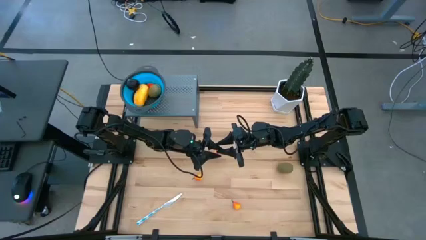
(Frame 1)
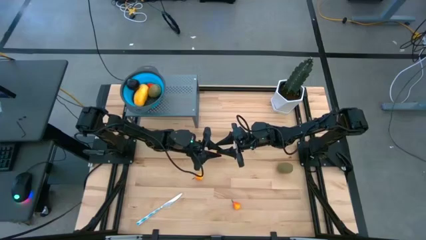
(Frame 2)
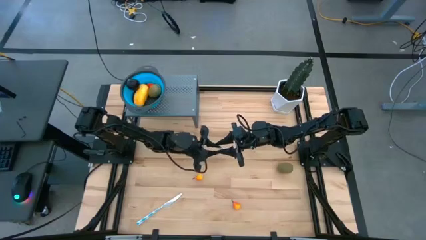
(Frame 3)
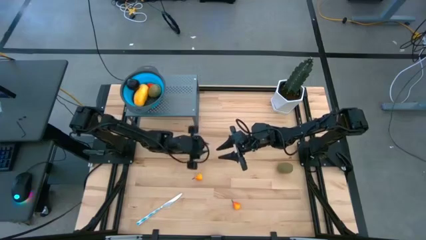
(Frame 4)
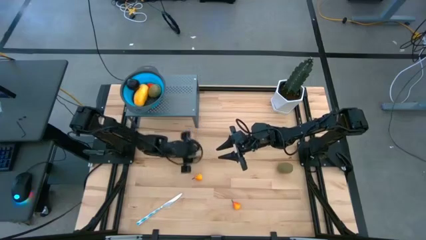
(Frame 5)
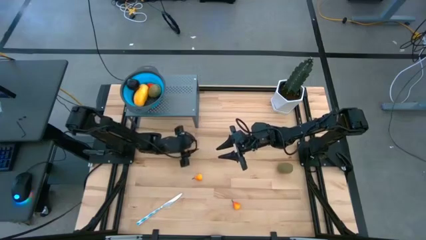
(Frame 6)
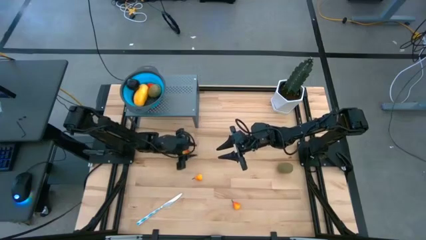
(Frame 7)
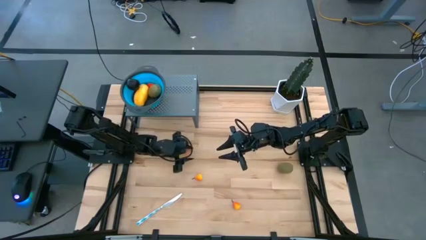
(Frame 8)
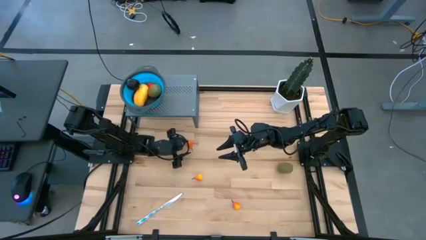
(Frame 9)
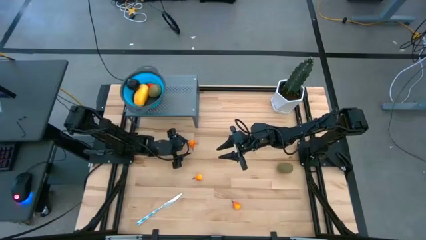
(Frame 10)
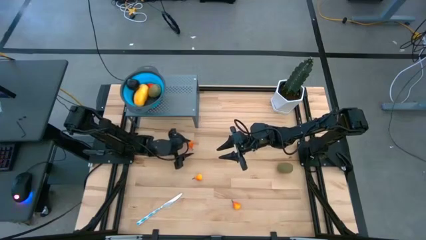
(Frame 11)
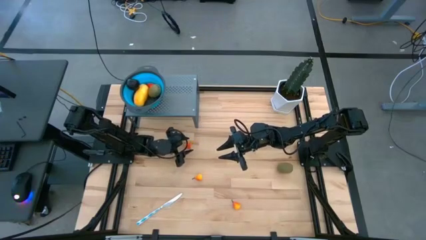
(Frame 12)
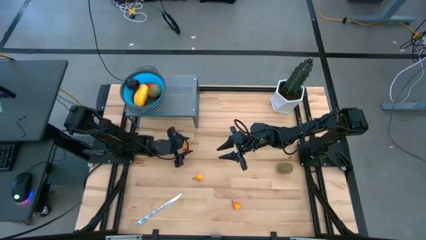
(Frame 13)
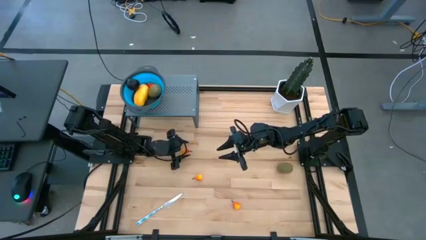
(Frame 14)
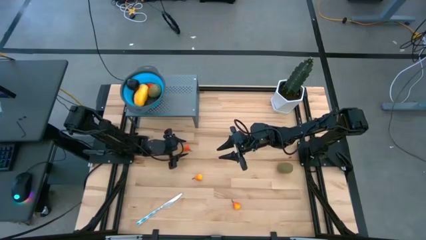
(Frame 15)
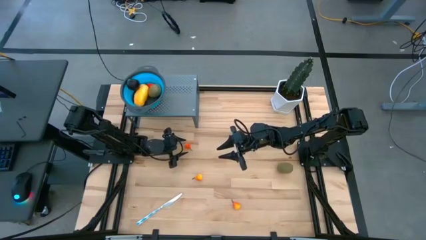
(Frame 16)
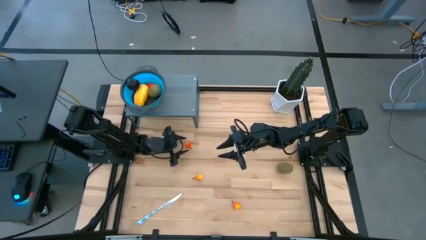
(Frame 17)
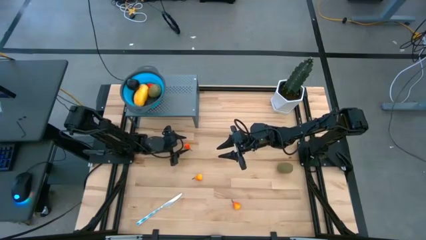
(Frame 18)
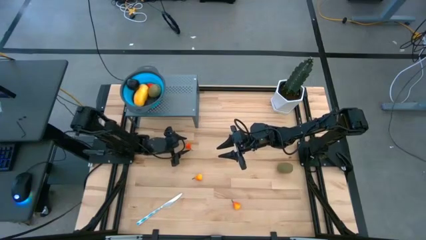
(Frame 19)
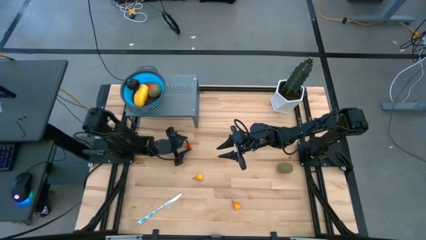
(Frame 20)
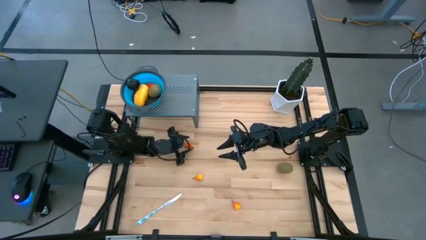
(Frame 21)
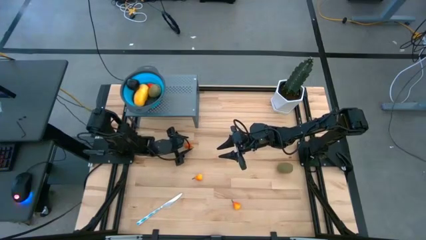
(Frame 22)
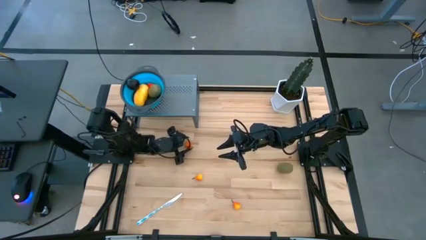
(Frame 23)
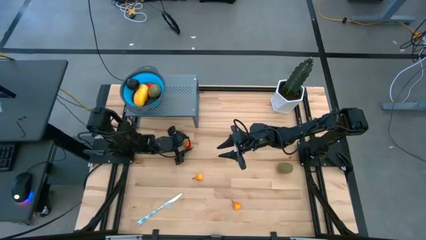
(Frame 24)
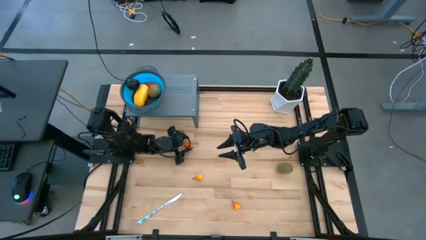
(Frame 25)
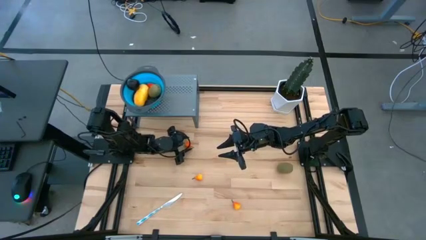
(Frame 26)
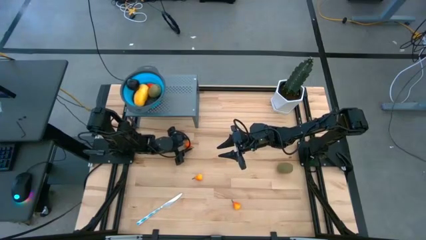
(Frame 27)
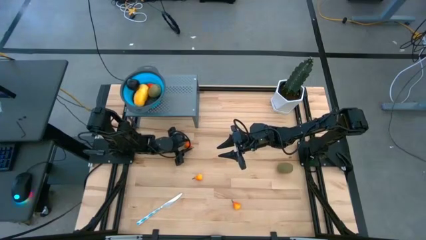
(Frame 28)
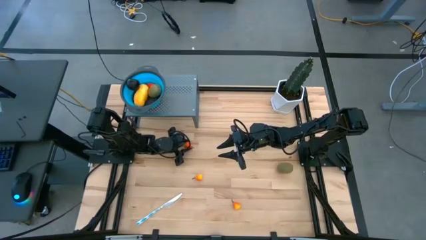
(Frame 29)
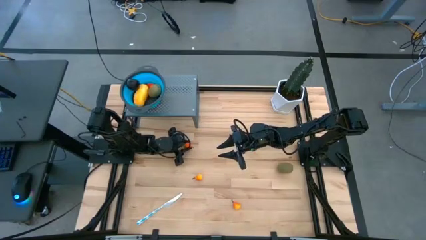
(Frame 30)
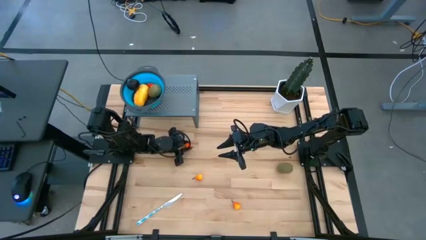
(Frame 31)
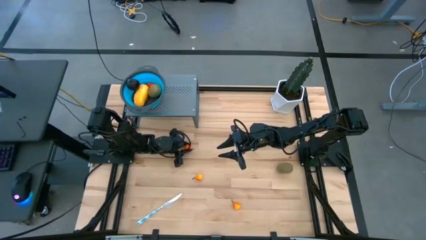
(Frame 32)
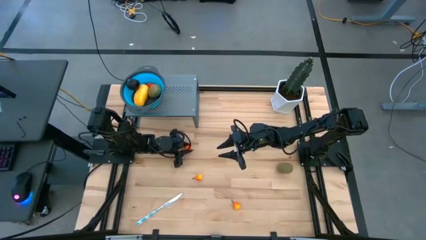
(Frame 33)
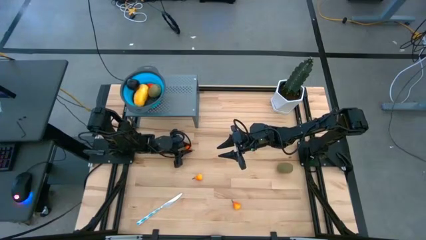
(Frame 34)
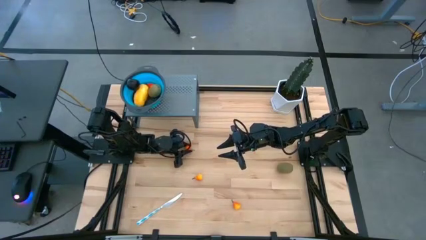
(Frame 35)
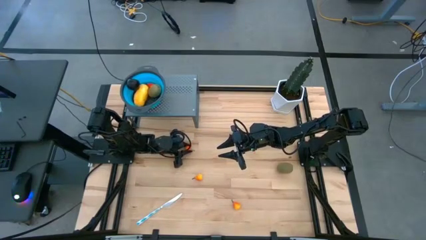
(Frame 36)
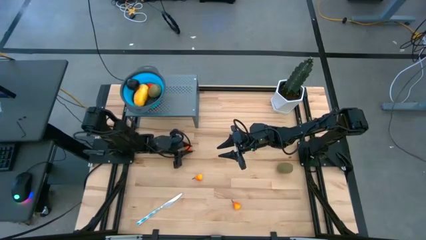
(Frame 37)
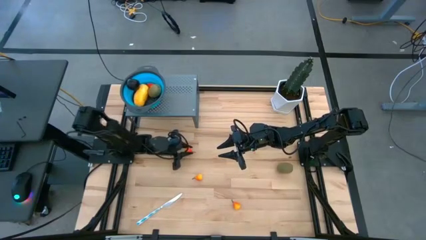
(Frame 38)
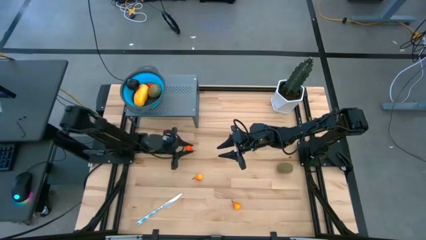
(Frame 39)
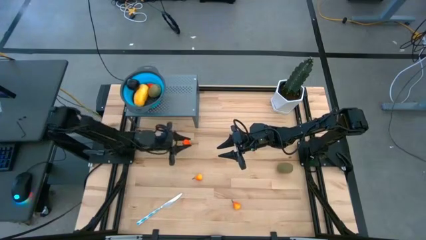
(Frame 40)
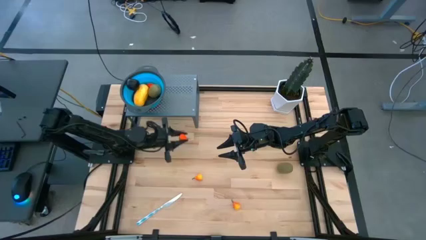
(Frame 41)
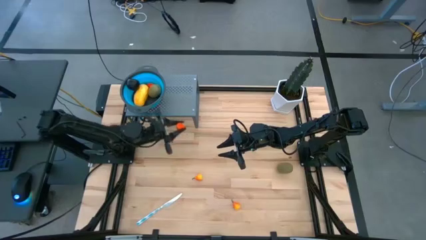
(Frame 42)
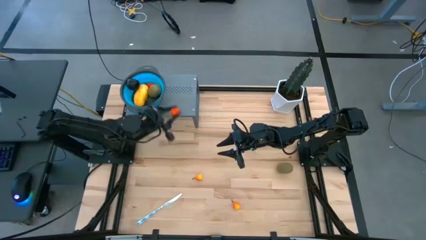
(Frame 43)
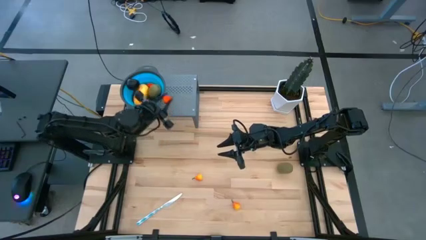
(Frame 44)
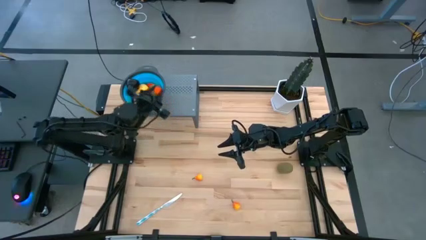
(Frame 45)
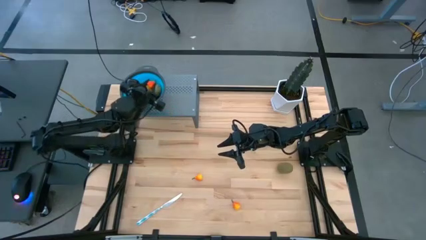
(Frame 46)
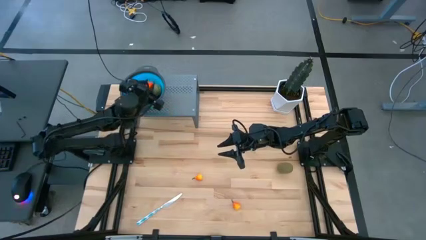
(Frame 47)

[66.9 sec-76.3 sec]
Task: Pick & Place Fruit
Put the orange pear into the blue strainer bowl on the shelf

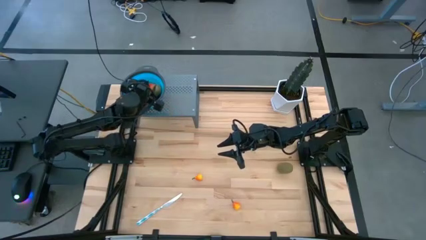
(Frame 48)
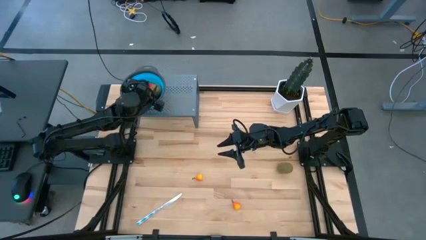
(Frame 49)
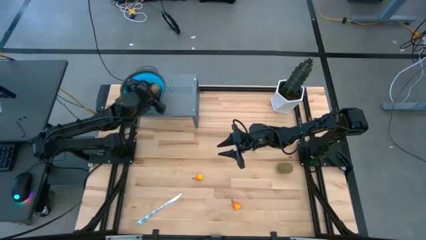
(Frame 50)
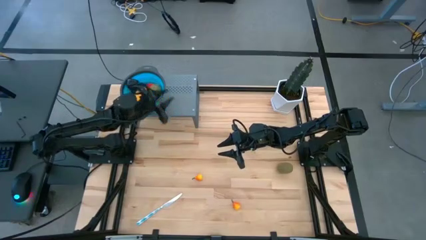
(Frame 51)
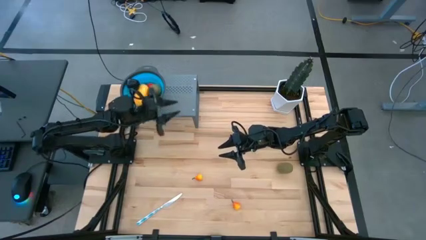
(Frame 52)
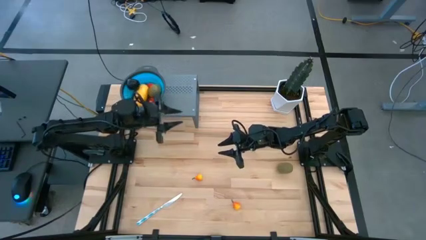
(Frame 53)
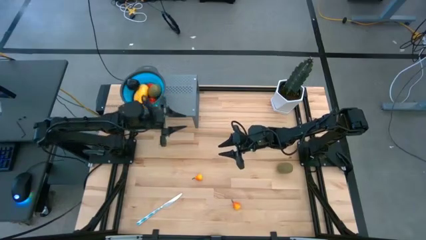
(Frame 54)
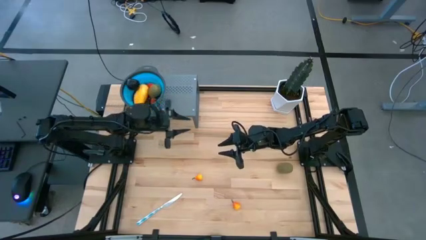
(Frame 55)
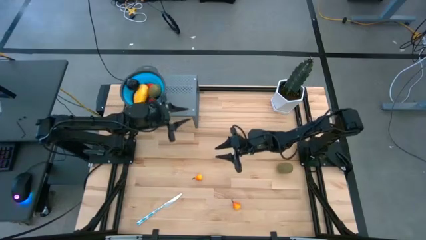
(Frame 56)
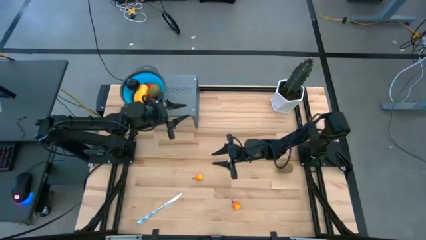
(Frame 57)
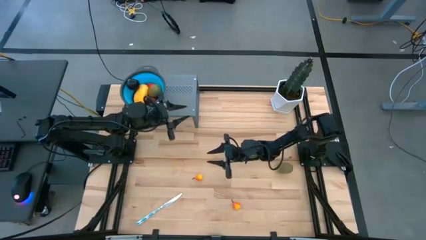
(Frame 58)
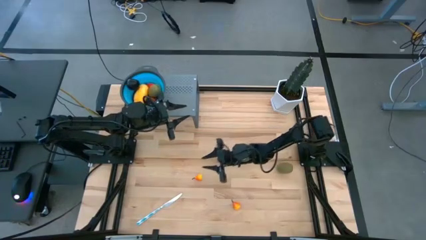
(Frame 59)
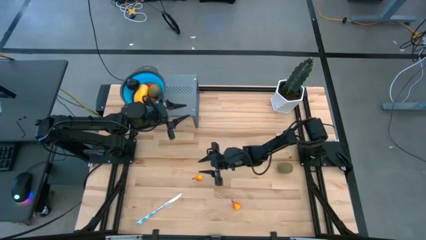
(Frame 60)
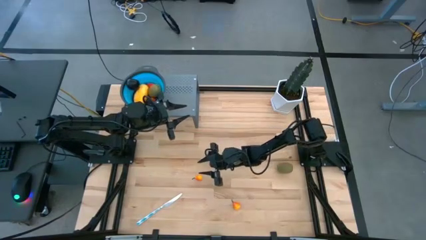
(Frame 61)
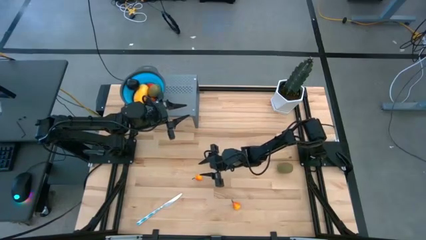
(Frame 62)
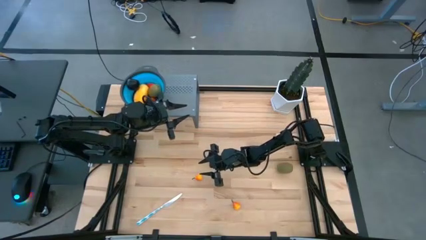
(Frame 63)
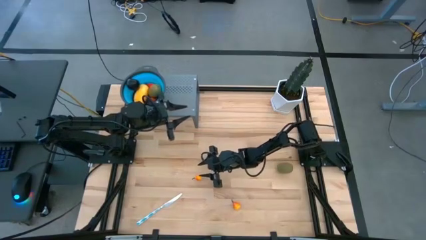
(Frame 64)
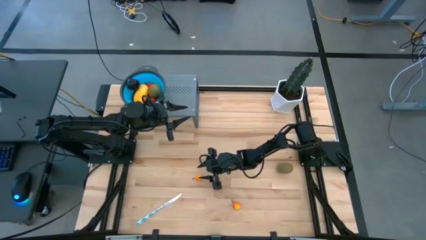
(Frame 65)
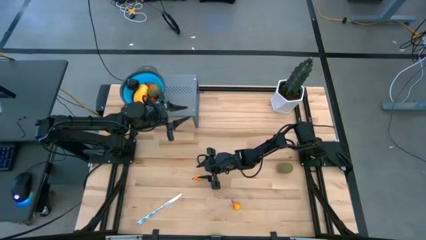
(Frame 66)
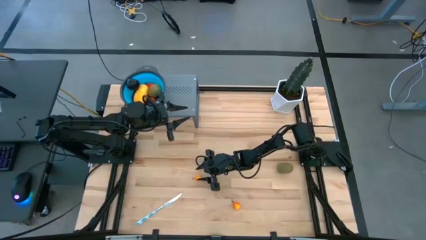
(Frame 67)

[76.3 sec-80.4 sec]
Put the orange pear into the blue strainer bowl on the shelf
